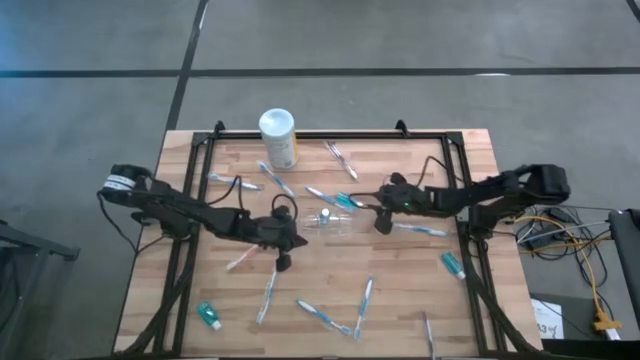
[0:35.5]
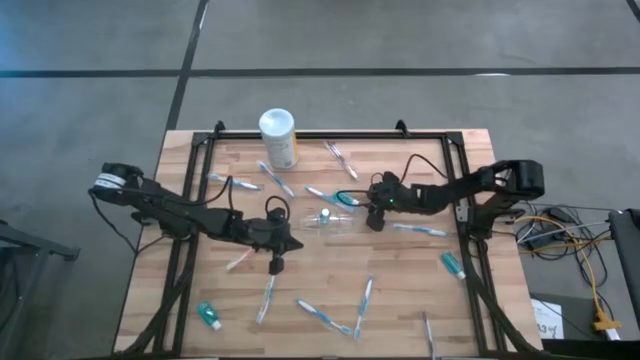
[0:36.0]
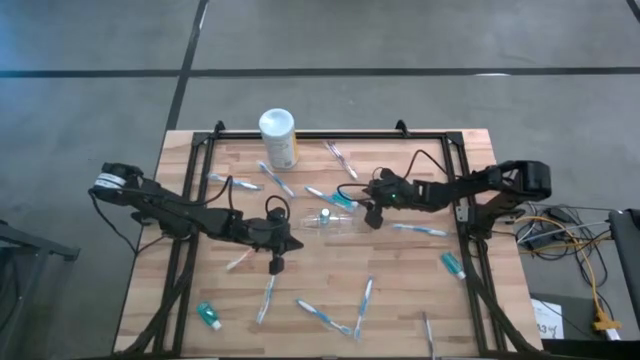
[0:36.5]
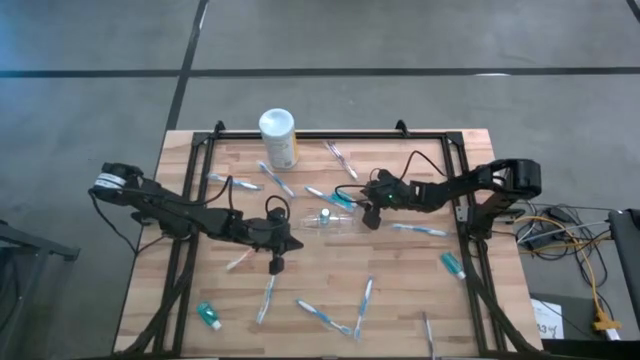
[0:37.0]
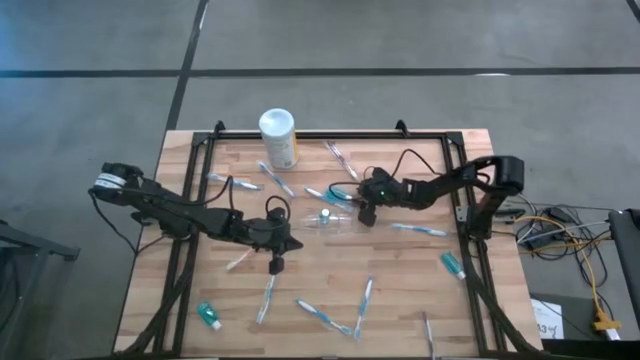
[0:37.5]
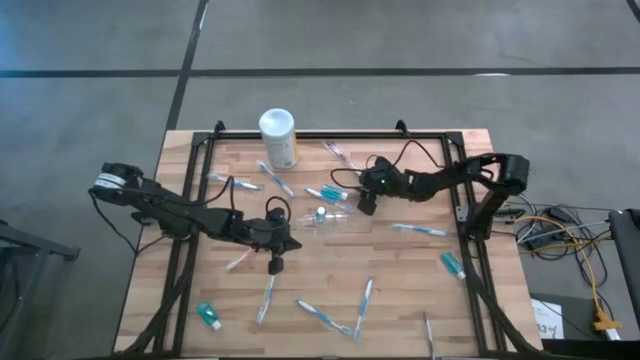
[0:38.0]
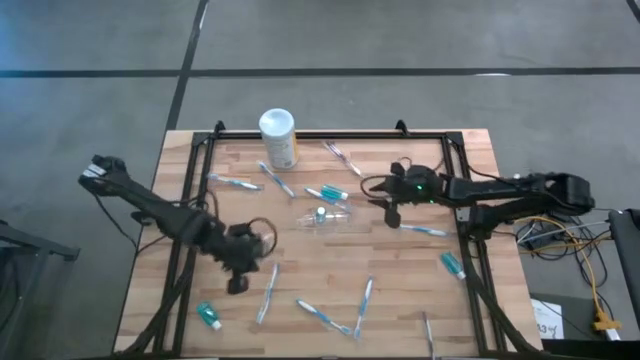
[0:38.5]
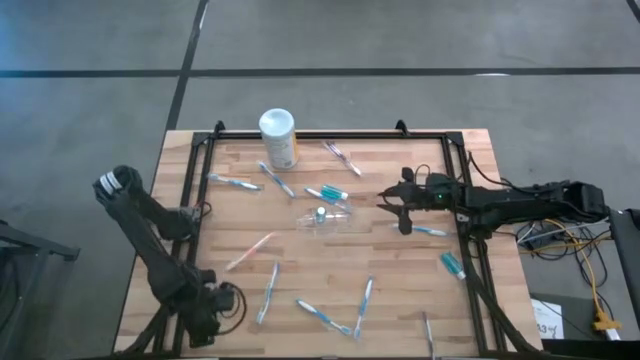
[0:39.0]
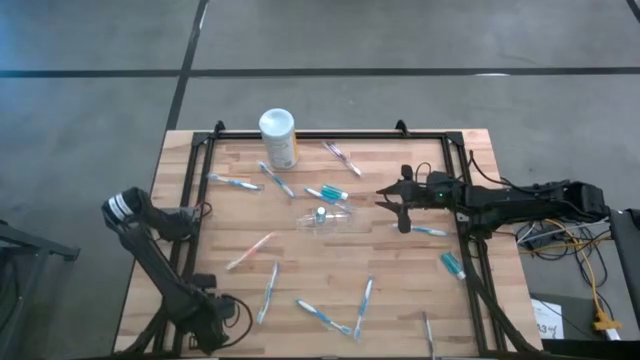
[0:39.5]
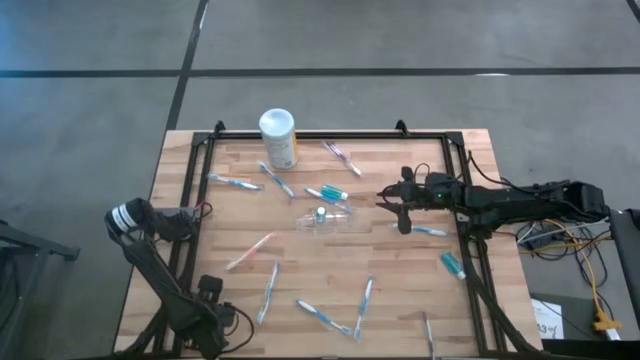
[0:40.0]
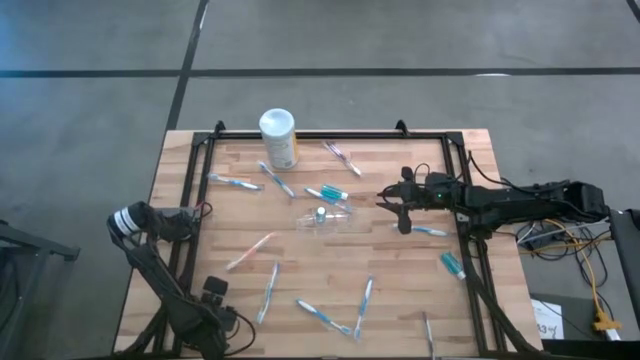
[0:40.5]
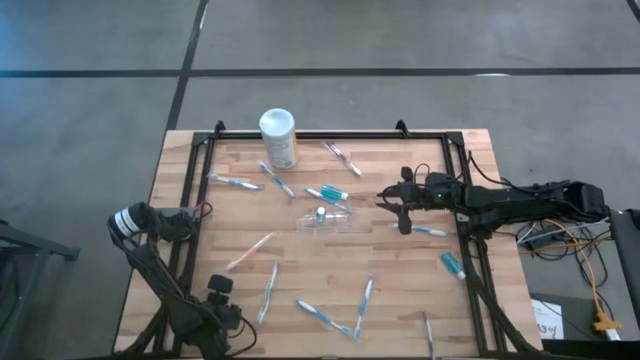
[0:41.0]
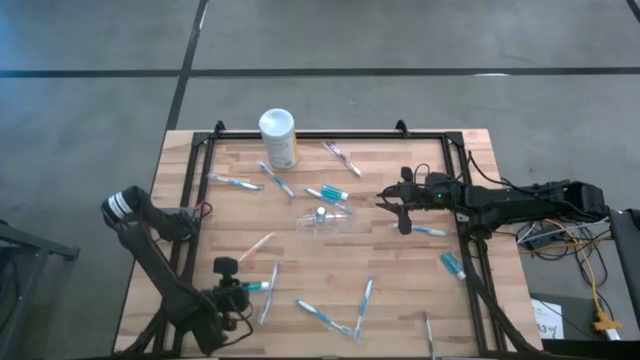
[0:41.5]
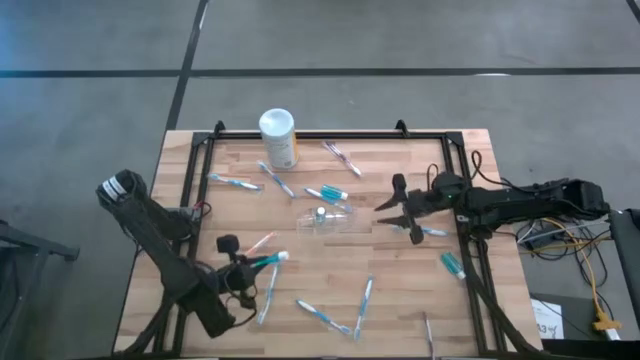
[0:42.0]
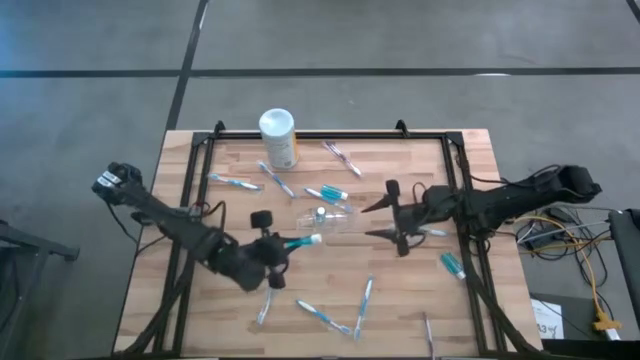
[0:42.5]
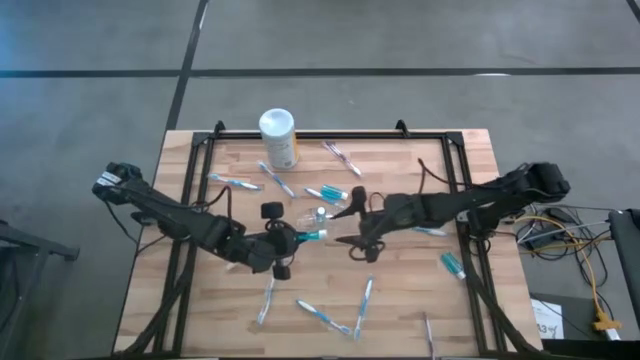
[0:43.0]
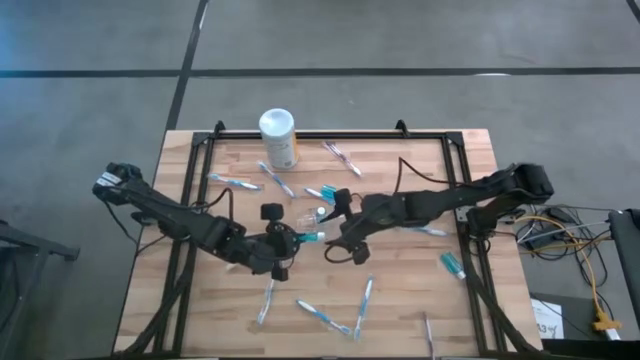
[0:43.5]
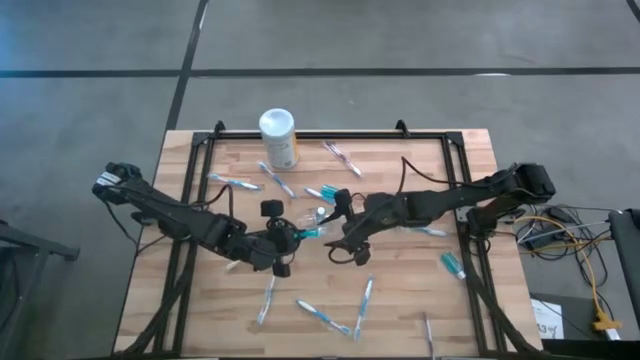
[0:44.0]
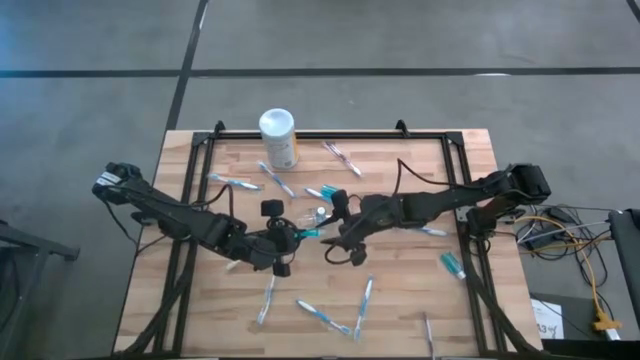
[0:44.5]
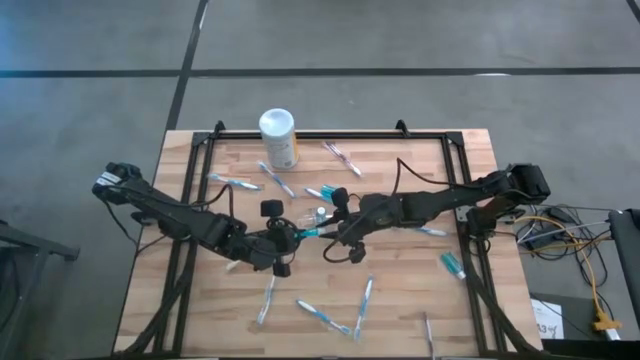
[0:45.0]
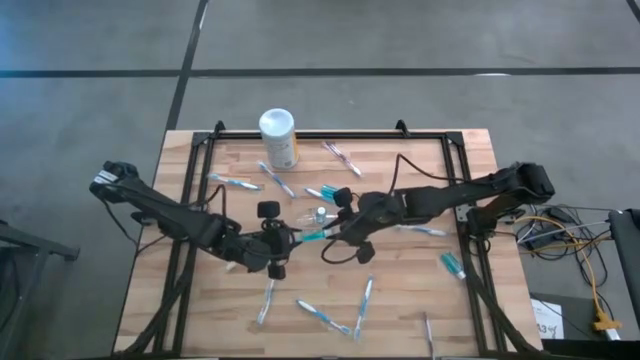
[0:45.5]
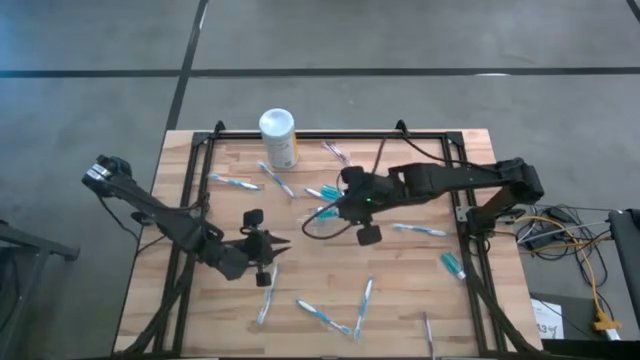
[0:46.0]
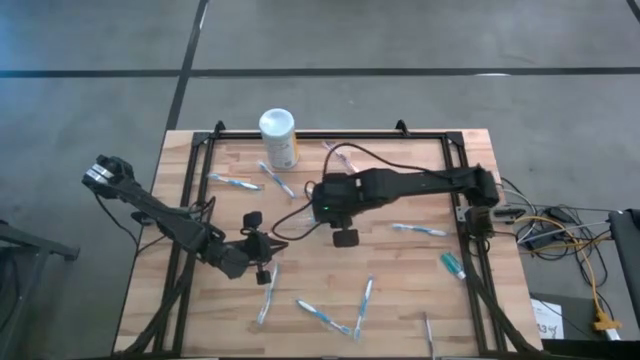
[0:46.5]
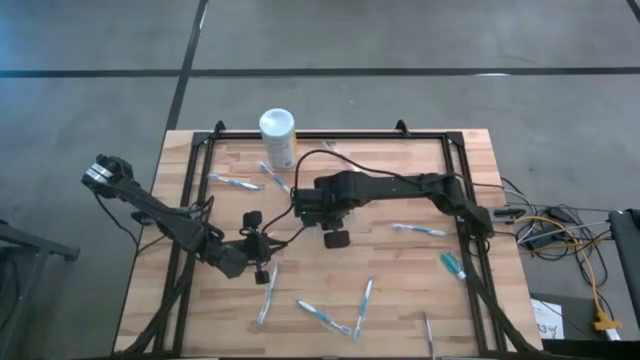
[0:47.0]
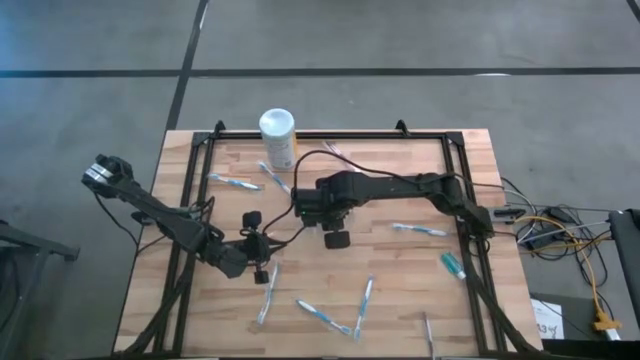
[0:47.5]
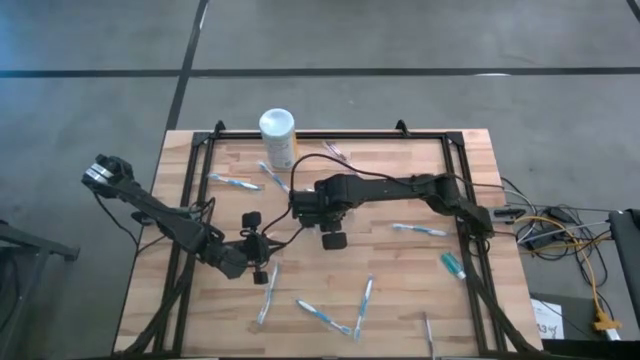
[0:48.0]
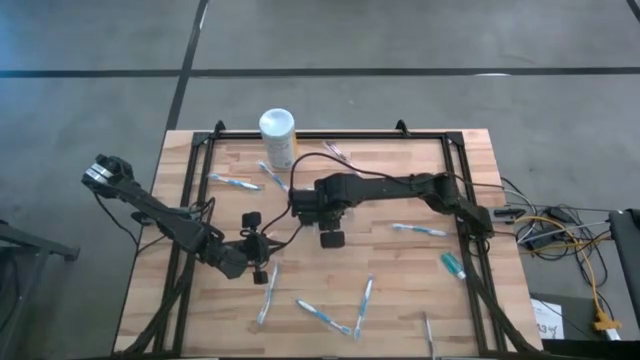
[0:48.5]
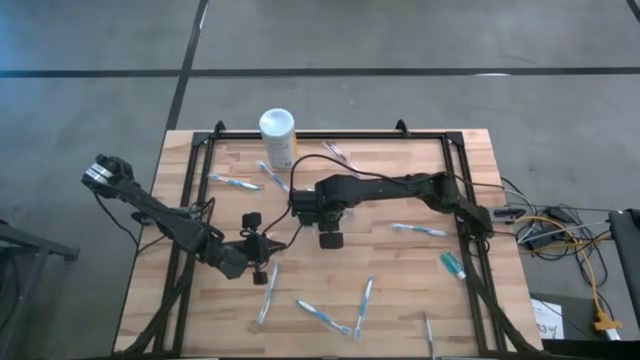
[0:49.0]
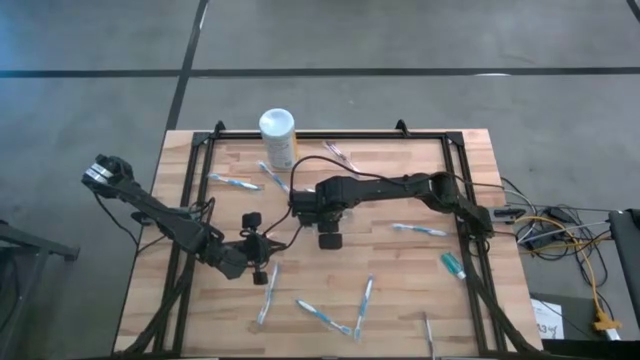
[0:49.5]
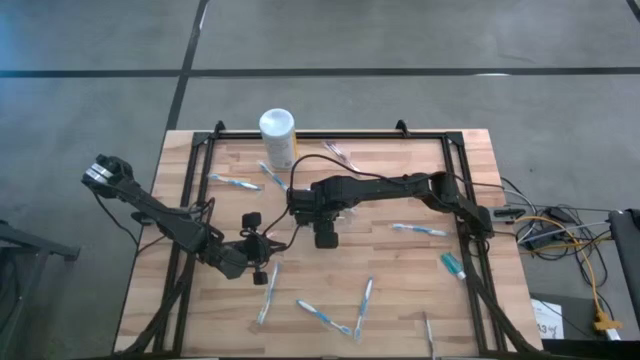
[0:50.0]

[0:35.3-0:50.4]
Task: Pick & Place toothbrushing station
Put the blue mouthwash into the transparent organizer

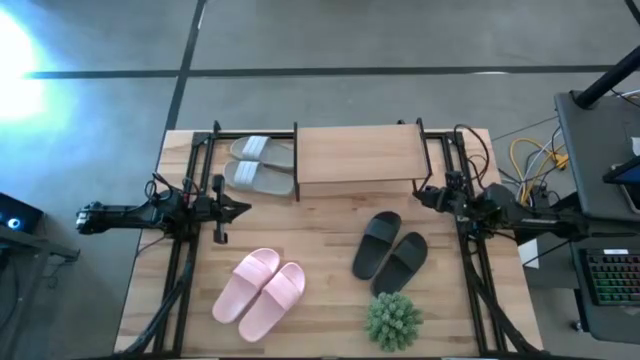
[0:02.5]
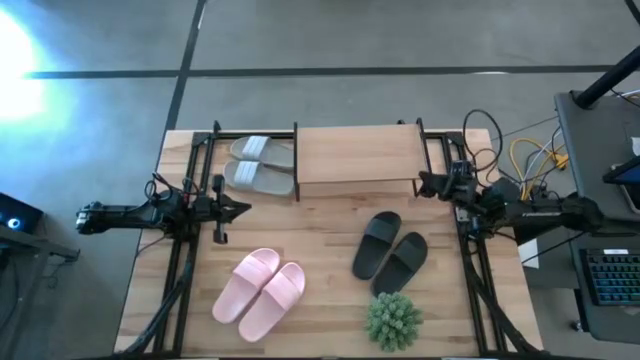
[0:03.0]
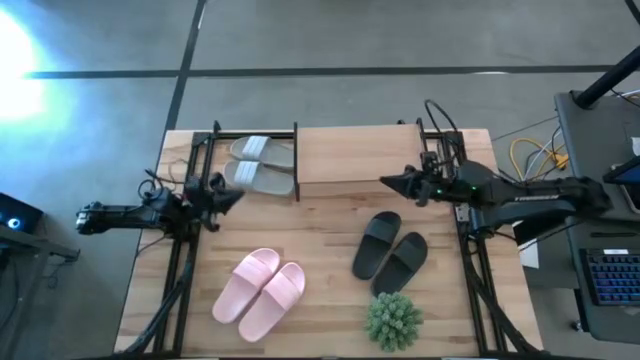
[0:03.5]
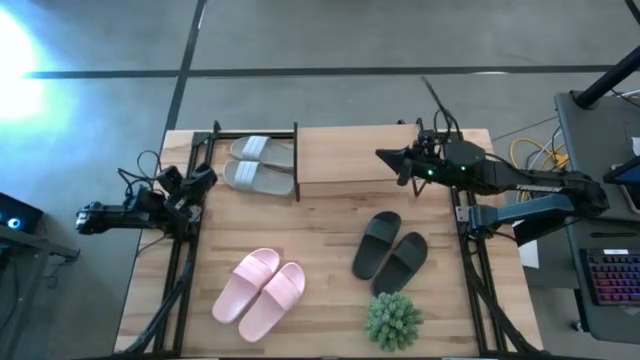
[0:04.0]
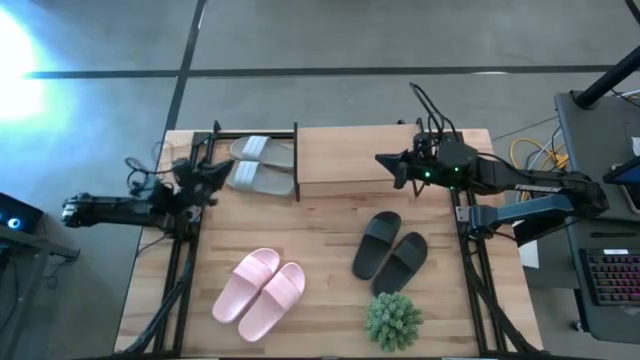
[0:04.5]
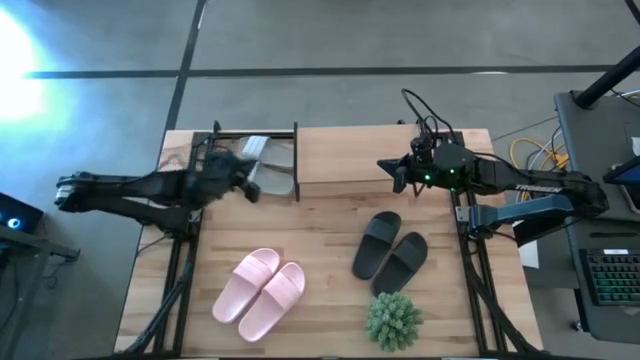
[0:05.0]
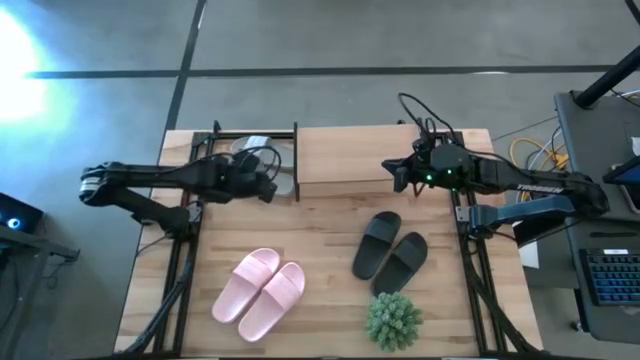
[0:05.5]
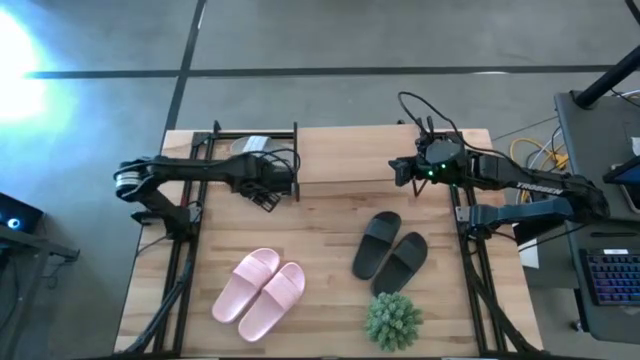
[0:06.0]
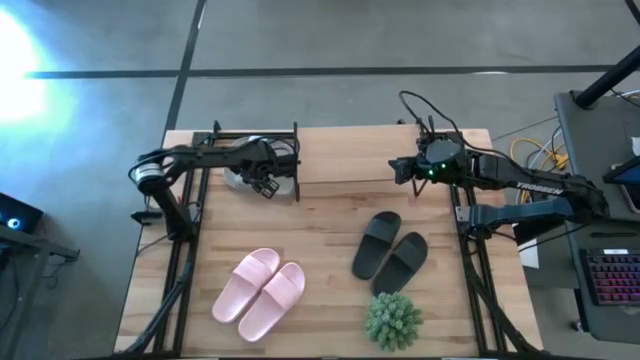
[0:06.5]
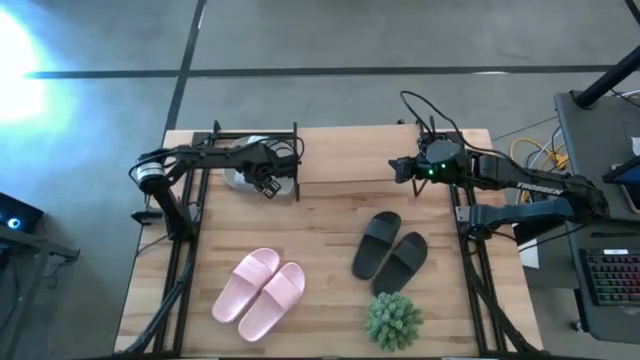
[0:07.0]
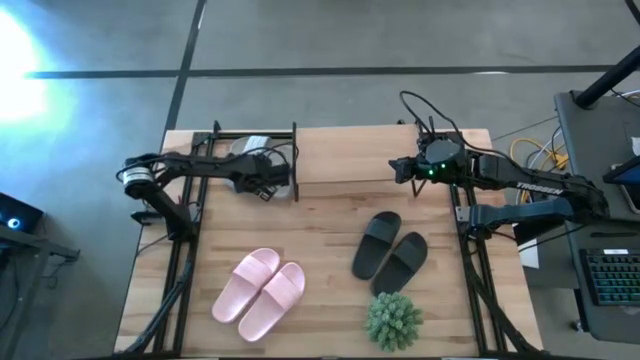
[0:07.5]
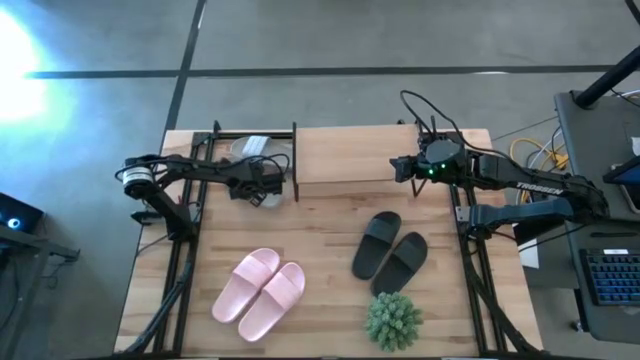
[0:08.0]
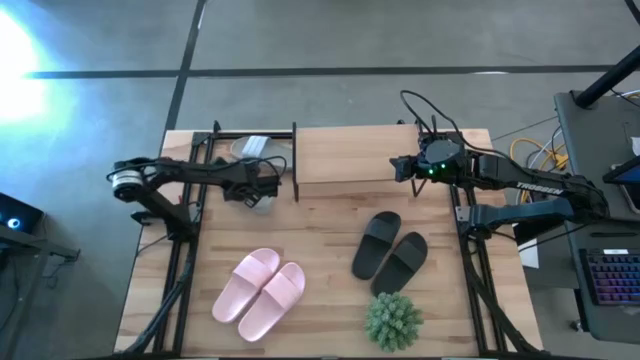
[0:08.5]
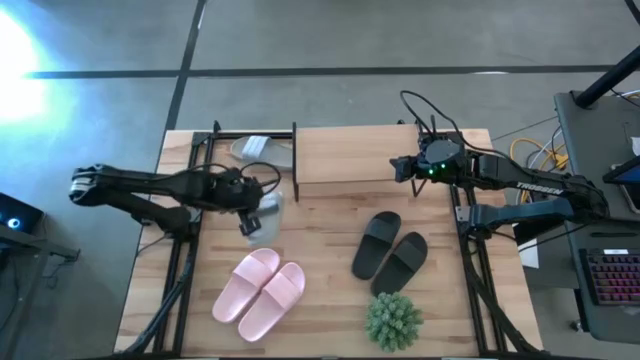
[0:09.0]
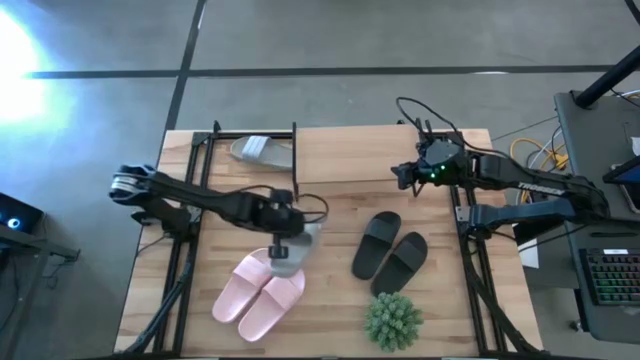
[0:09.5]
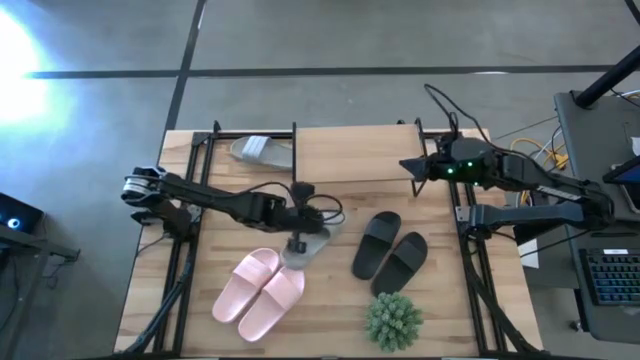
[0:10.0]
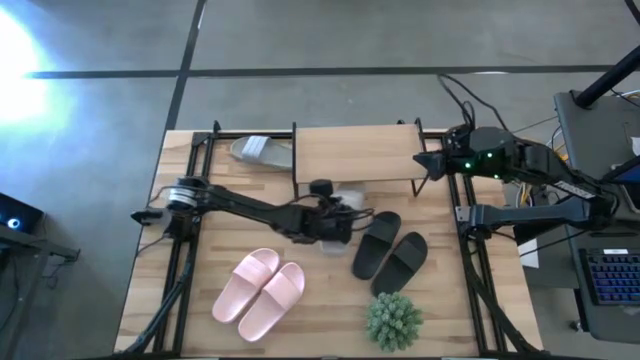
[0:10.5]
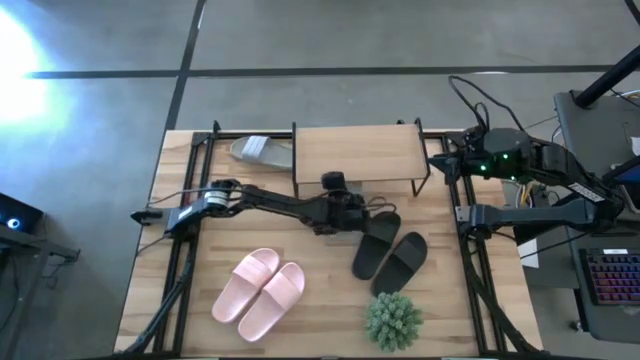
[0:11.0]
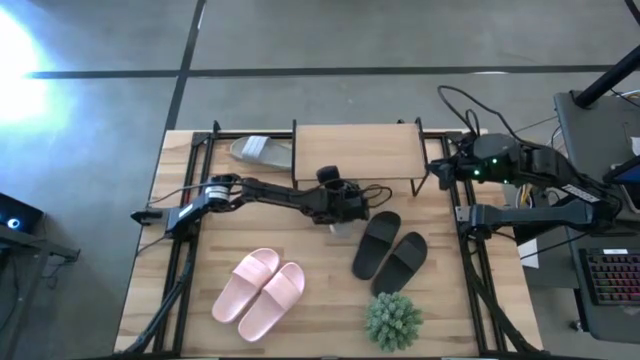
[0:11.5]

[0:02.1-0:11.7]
Task: Pick and place slides into the shelf
Put the bottom gray slides under the shelf
